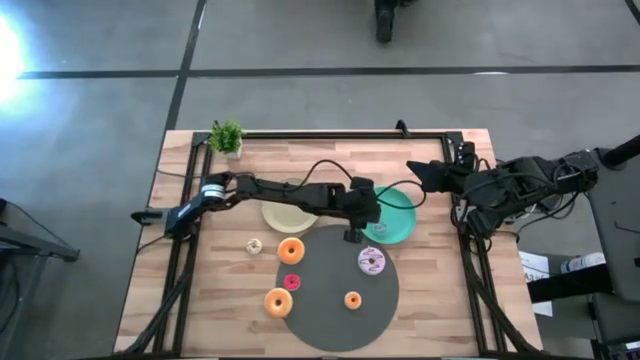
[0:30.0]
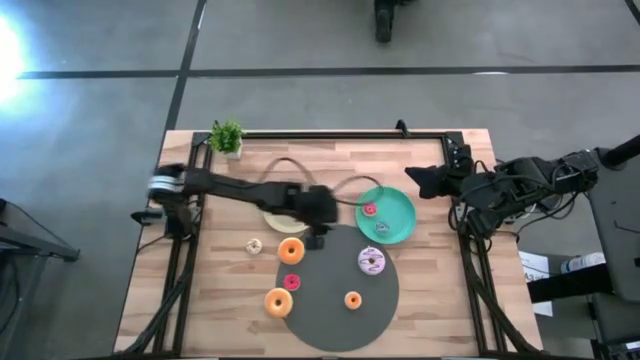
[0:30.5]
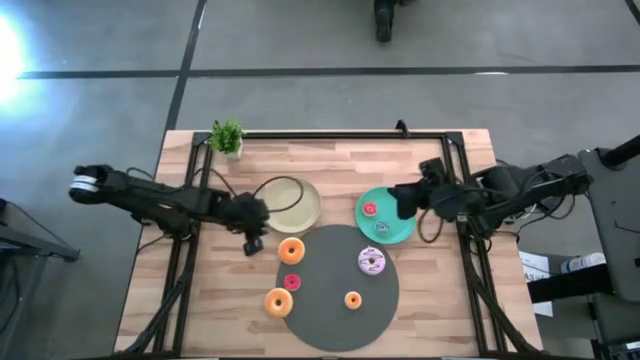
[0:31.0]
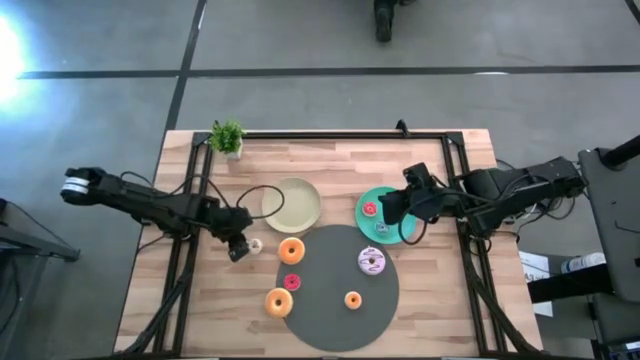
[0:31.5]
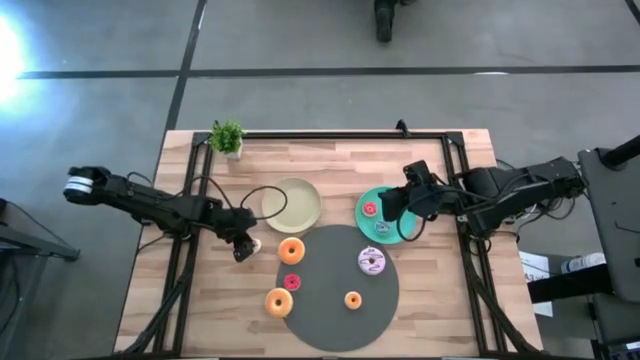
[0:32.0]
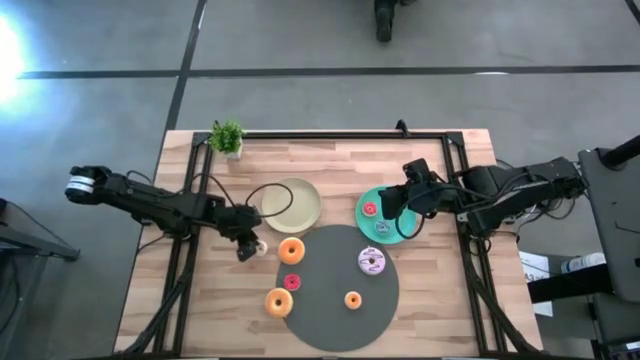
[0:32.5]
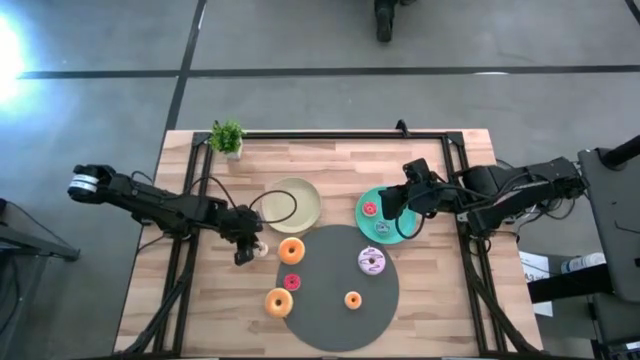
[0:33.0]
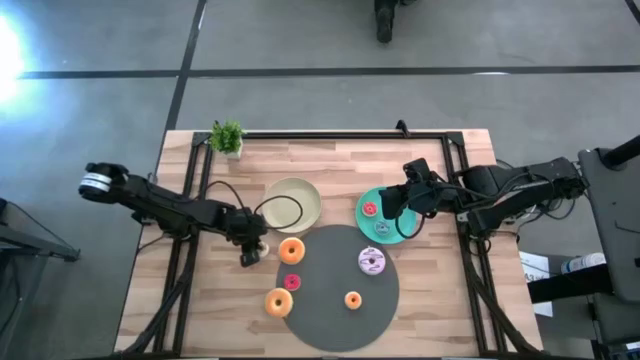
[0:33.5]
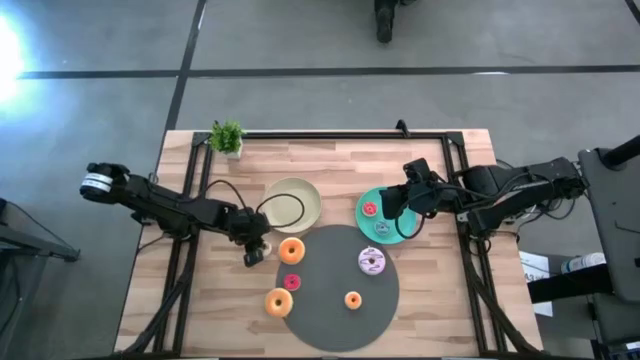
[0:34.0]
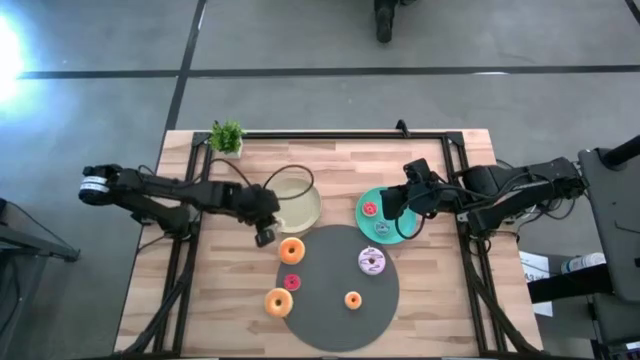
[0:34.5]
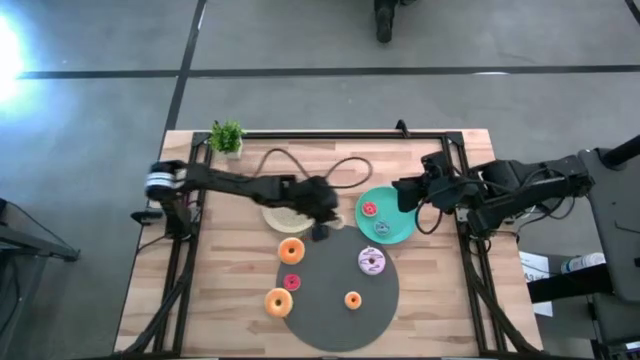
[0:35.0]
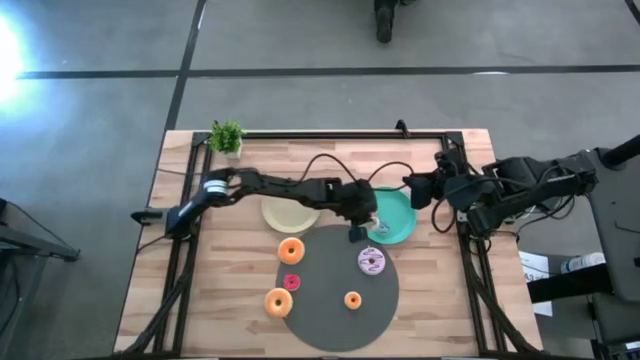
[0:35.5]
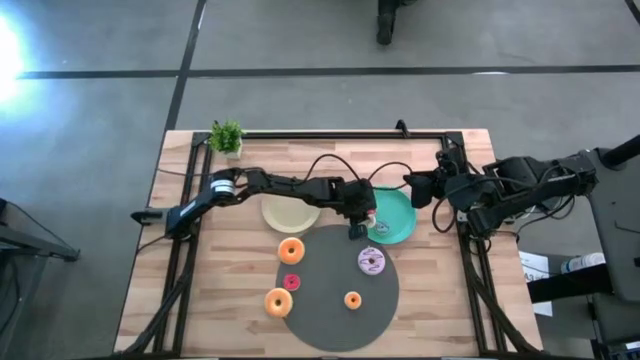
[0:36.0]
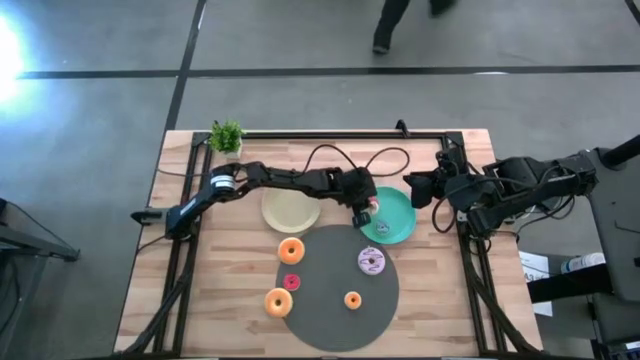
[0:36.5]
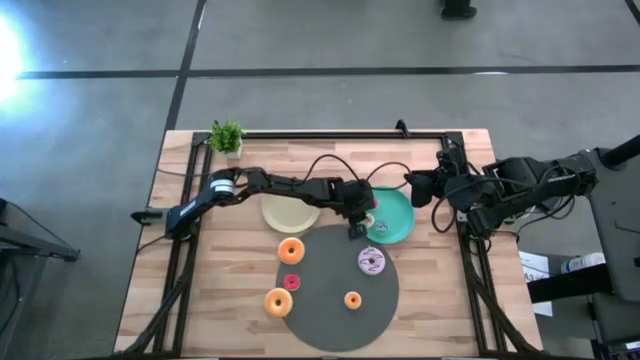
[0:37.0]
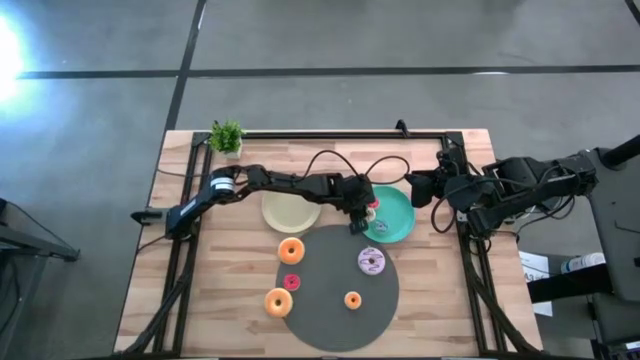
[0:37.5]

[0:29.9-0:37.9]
Task: Pick & Place donuts
Put the small white donut on the green plate

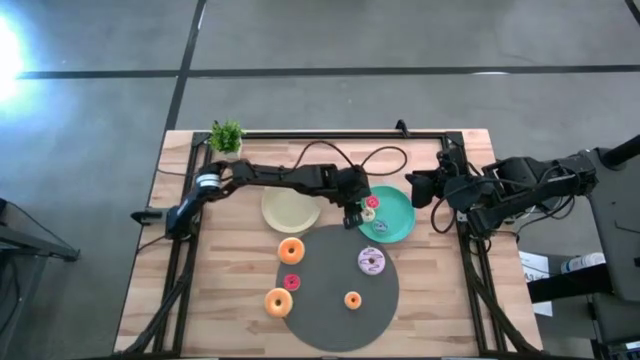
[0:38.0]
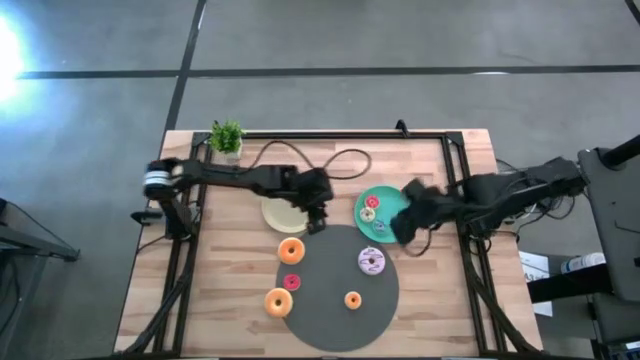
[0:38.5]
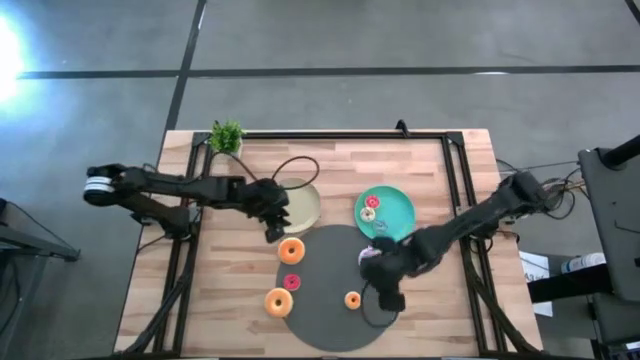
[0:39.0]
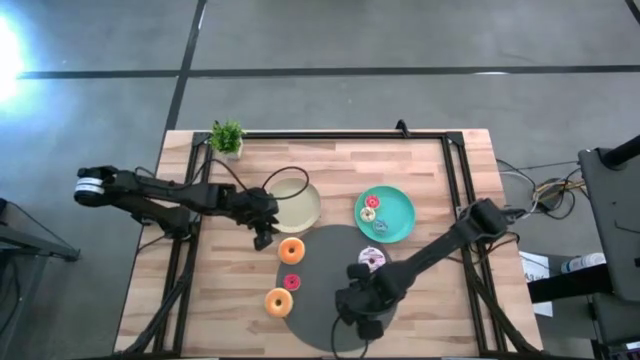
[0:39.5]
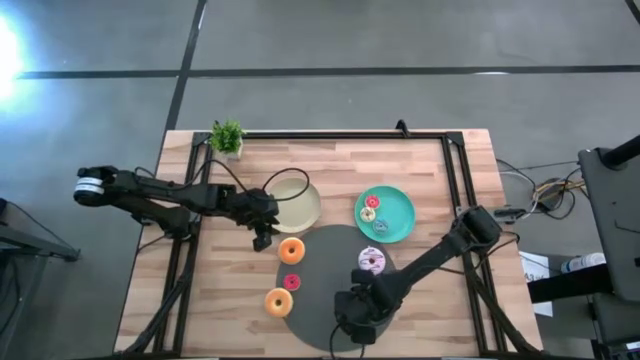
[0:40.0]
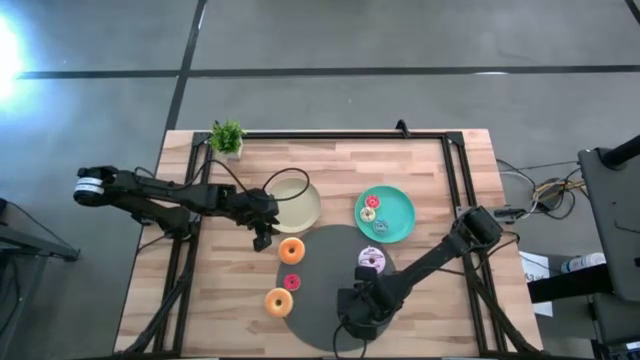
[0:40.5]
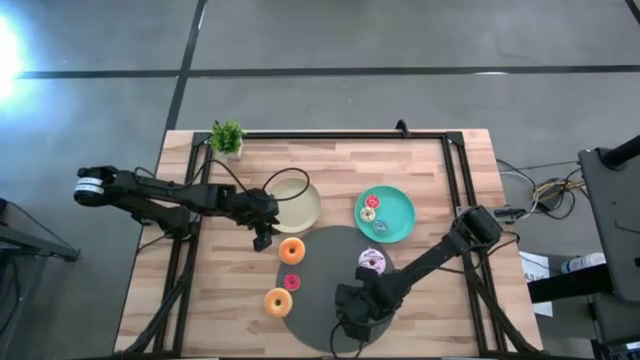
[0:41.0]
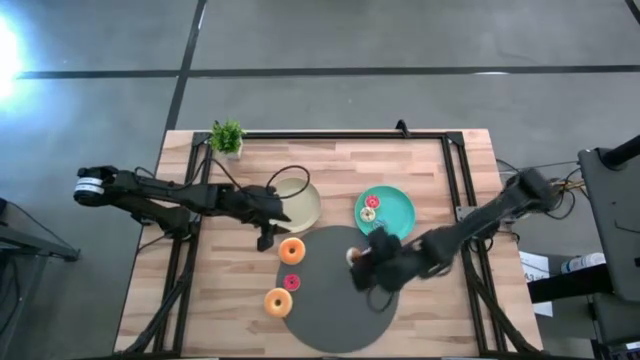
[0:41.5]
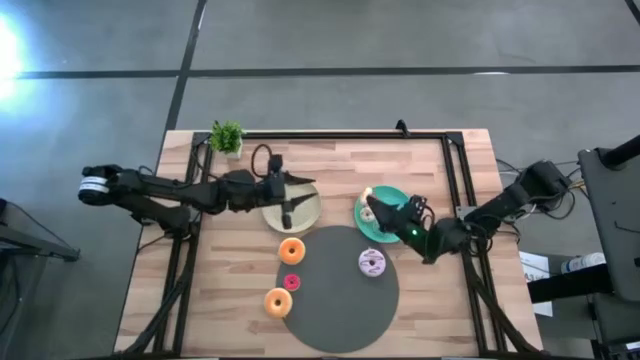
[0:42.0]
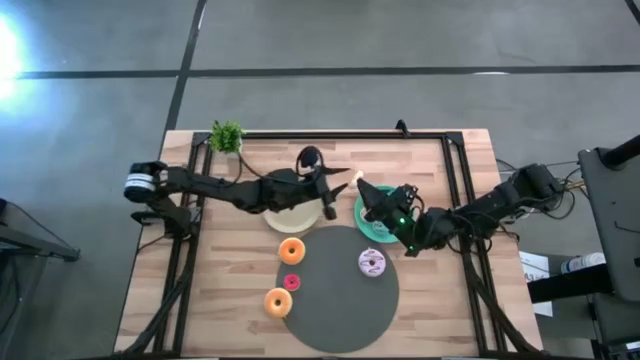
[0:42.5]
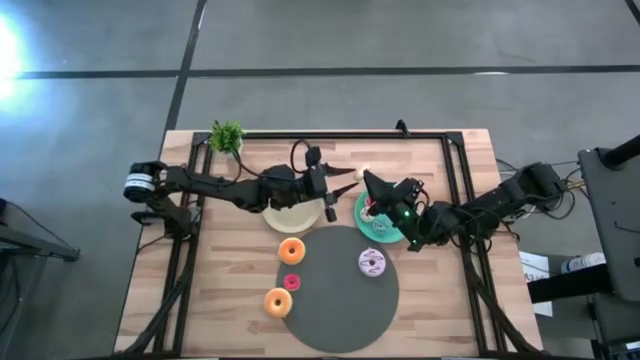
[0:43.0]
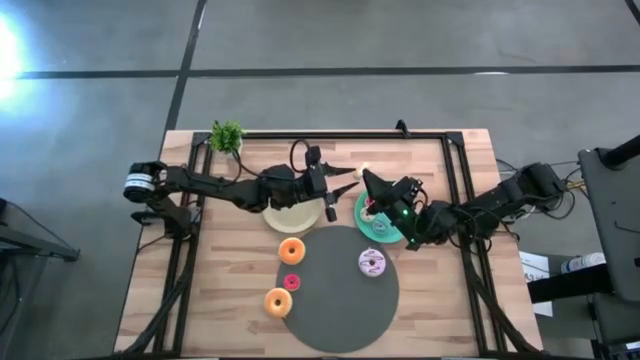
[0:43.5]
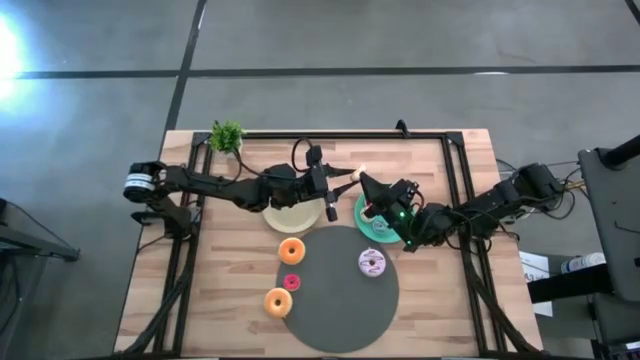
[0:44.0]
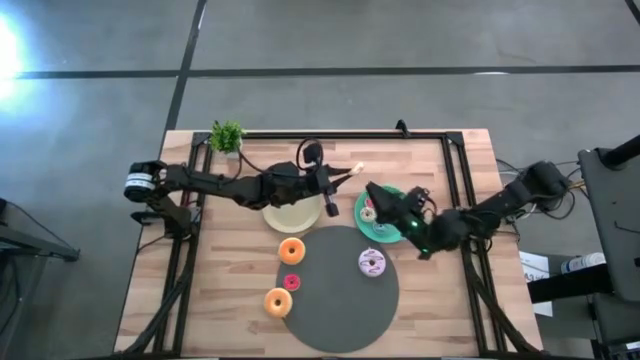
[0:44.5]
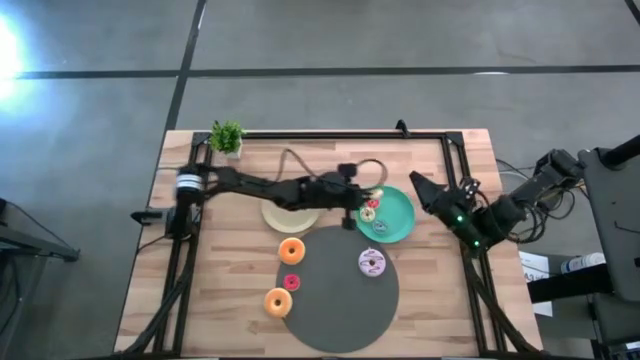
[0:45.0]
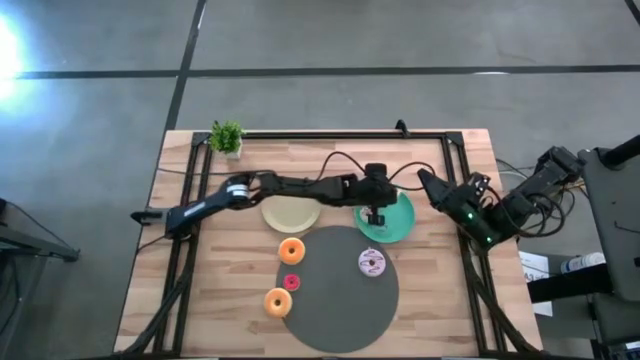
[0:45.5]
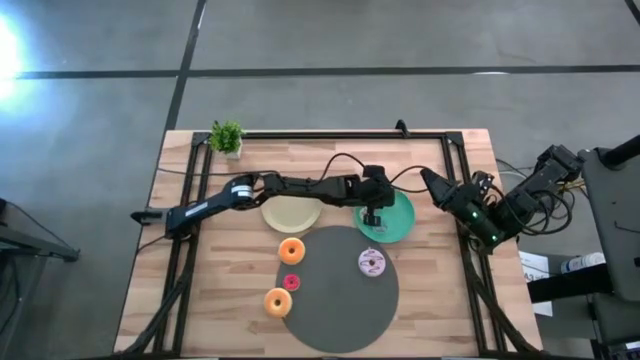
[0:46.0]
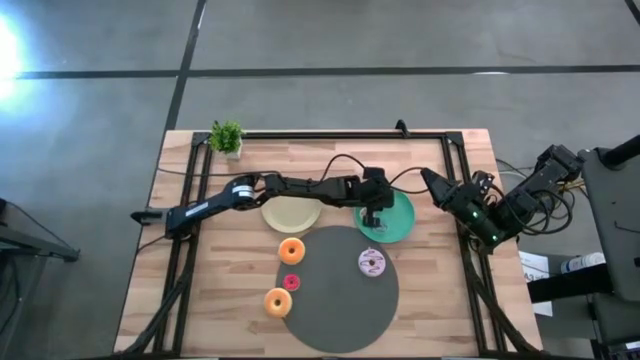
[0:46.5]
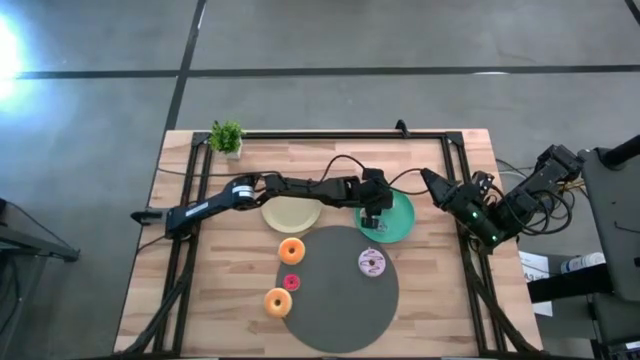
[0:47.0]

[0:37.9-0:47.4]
Put the small yellow donut on the green plate

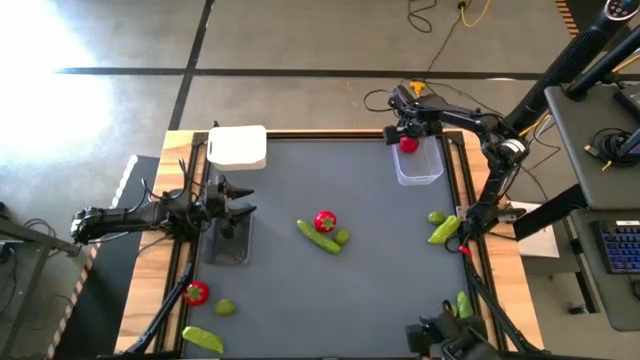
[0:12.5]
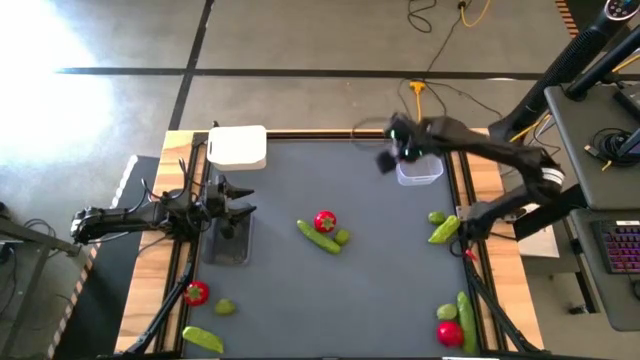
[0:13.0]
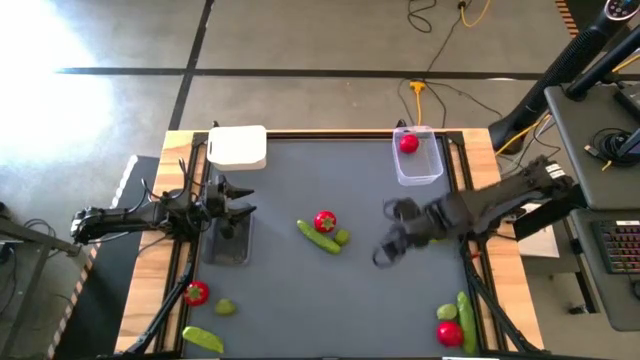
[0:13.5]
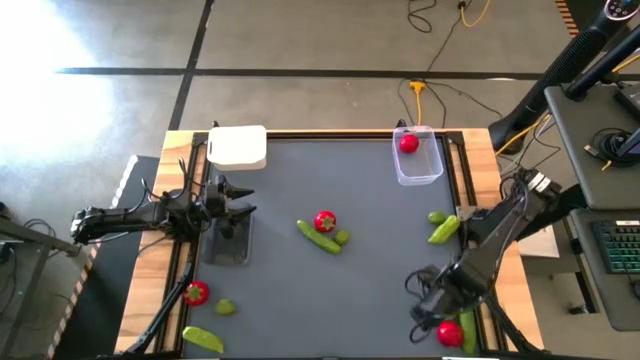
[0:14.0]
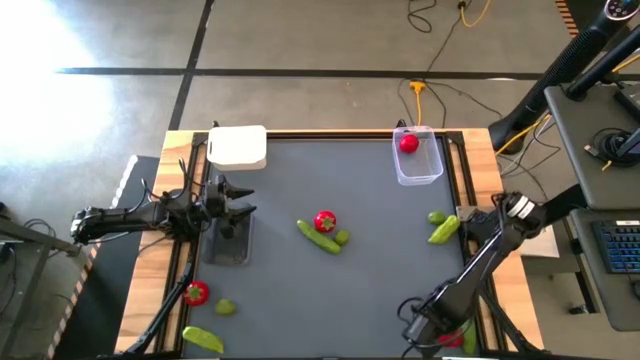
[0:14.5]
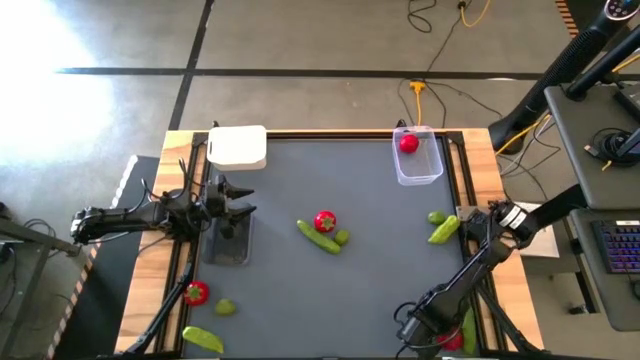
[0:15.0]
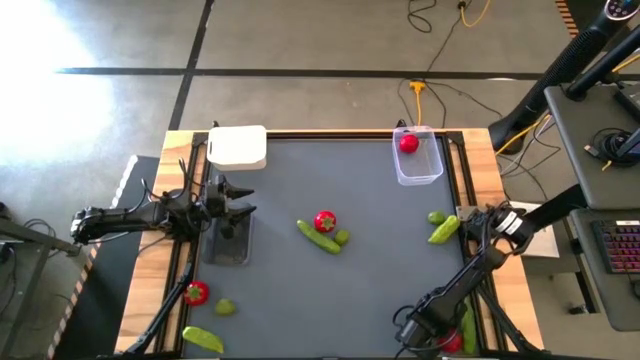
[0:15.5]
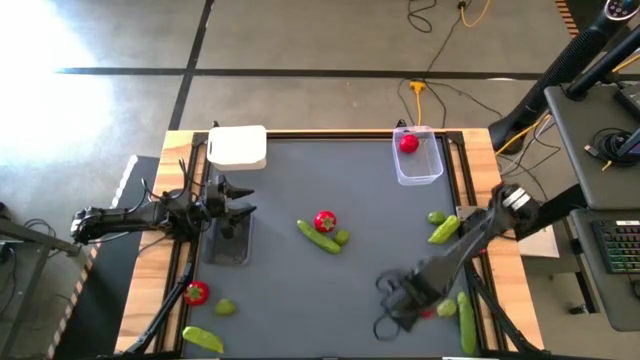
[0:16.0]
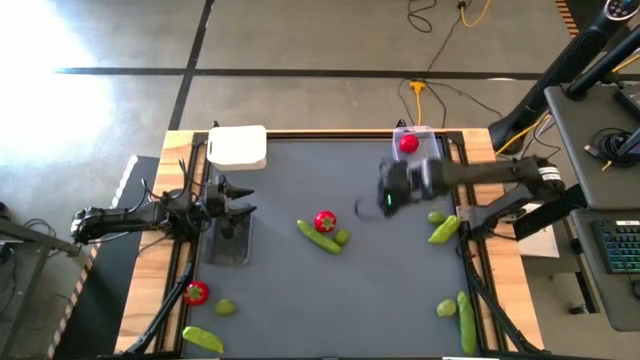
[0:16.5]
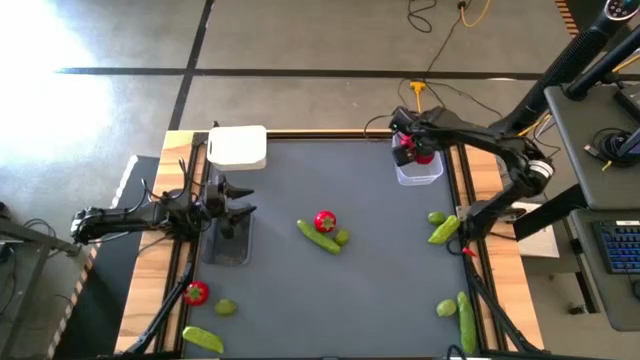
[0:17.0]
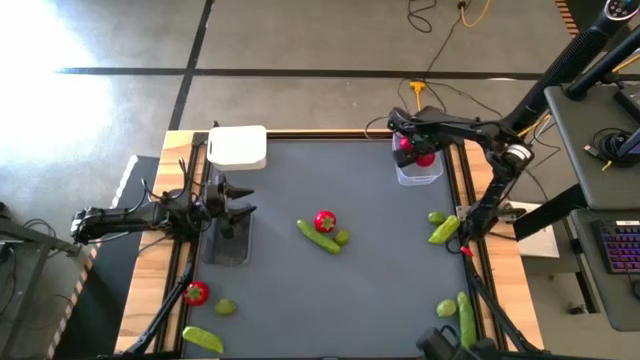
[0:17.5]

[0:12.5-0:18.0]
Task: Sort produce into baskets
Put the red tomato into the transparent bin
